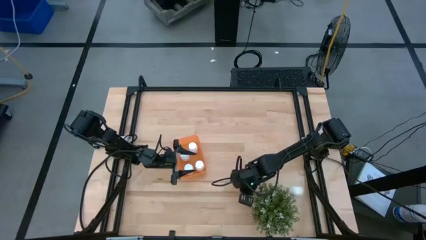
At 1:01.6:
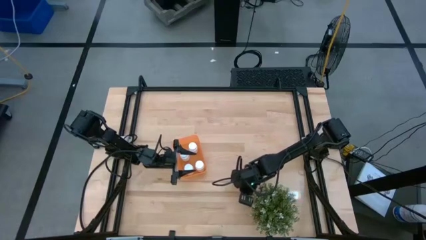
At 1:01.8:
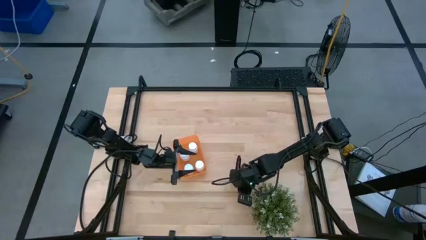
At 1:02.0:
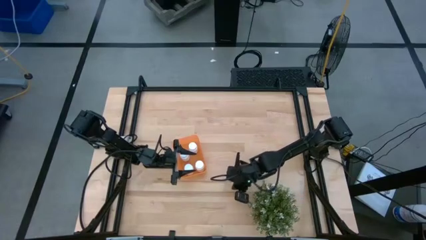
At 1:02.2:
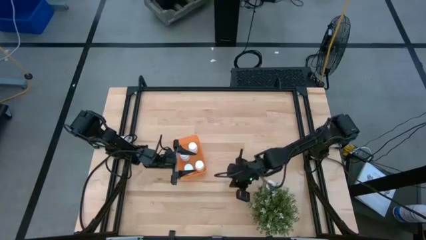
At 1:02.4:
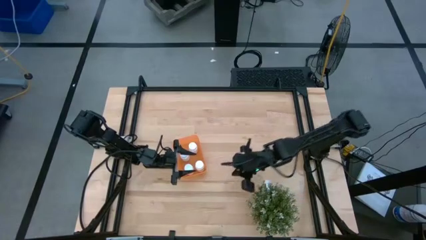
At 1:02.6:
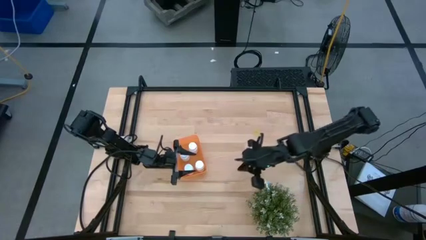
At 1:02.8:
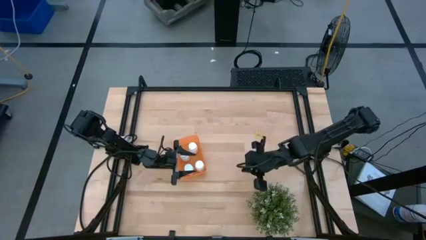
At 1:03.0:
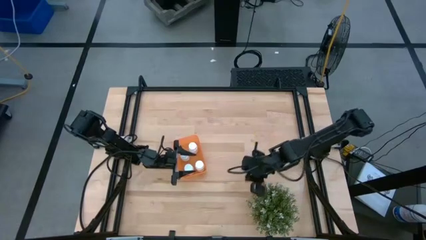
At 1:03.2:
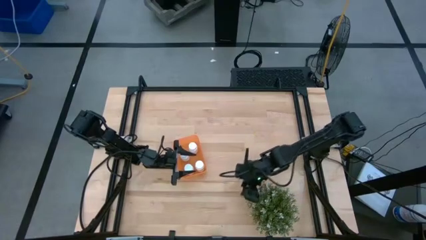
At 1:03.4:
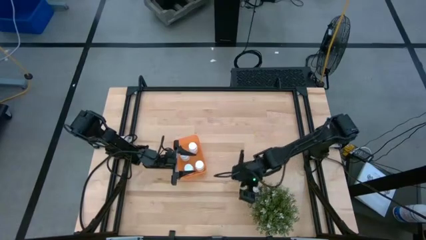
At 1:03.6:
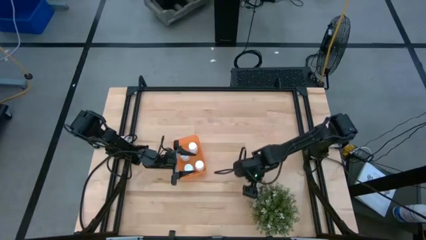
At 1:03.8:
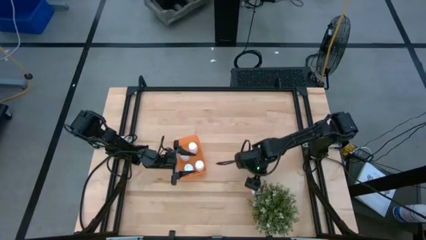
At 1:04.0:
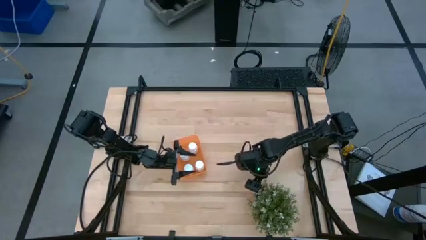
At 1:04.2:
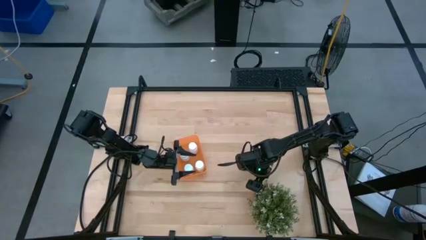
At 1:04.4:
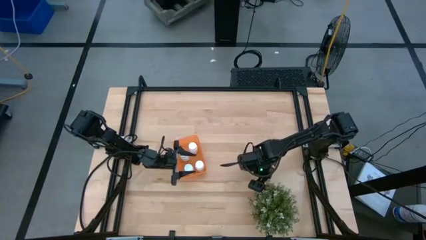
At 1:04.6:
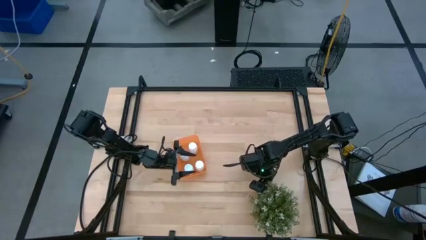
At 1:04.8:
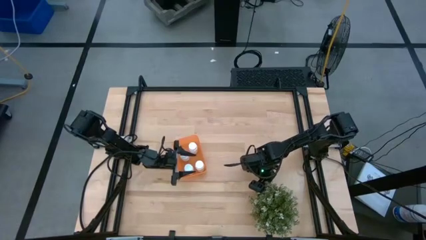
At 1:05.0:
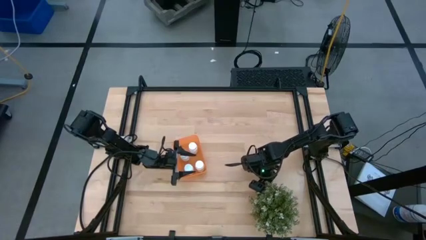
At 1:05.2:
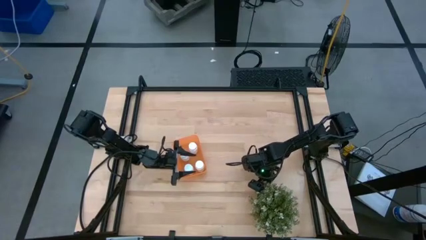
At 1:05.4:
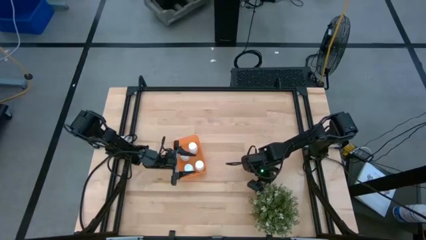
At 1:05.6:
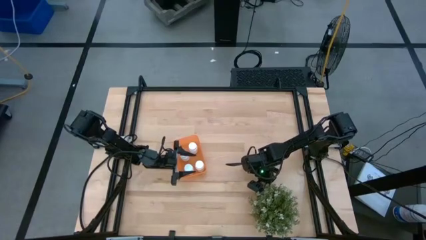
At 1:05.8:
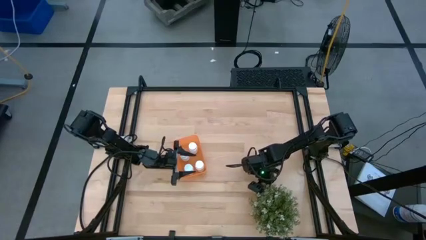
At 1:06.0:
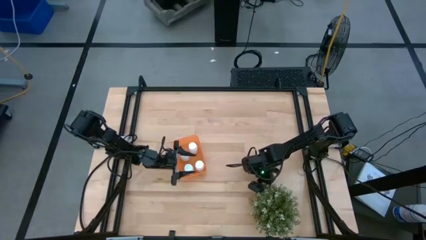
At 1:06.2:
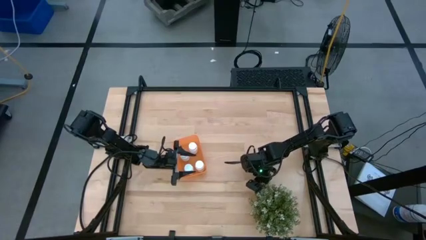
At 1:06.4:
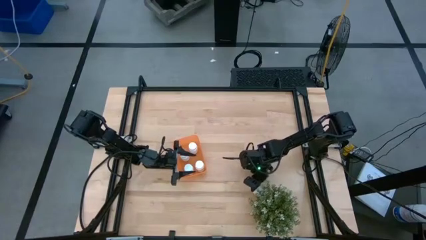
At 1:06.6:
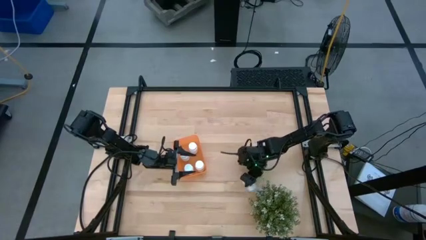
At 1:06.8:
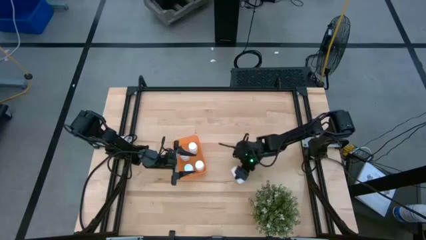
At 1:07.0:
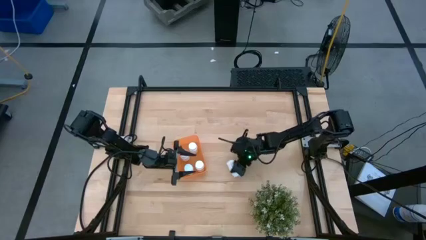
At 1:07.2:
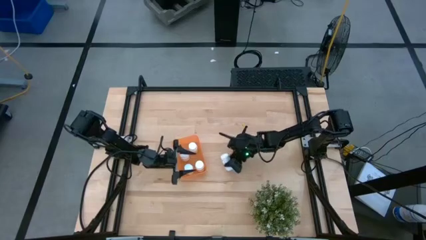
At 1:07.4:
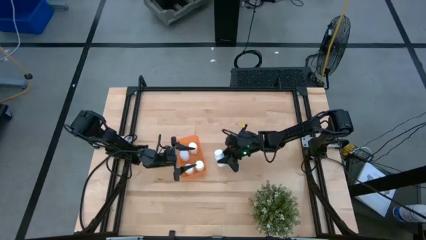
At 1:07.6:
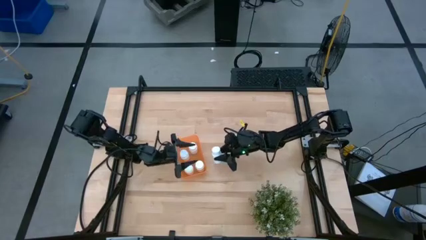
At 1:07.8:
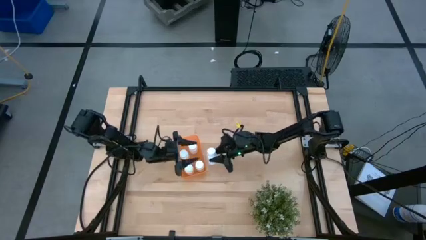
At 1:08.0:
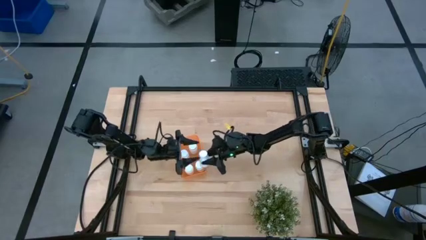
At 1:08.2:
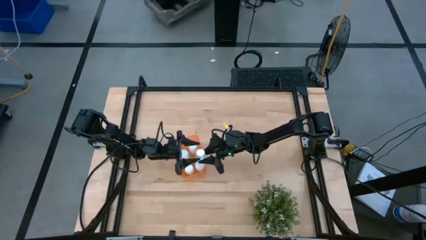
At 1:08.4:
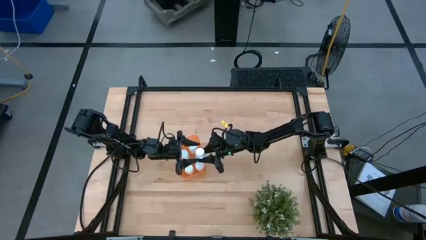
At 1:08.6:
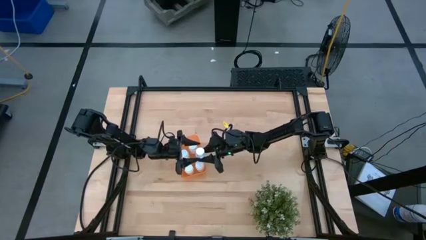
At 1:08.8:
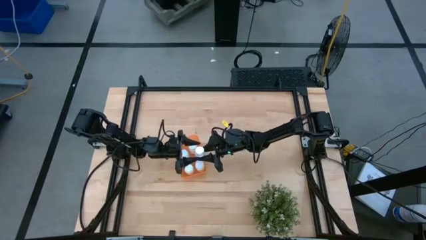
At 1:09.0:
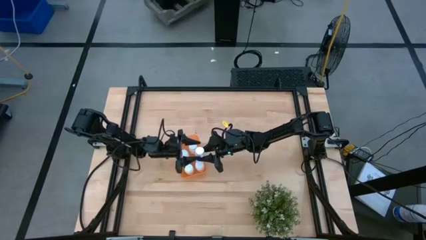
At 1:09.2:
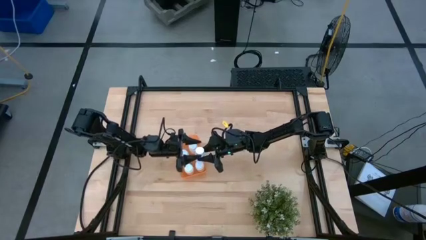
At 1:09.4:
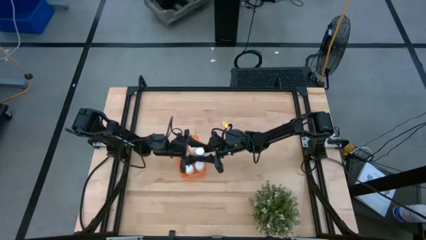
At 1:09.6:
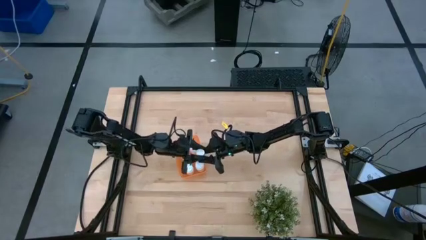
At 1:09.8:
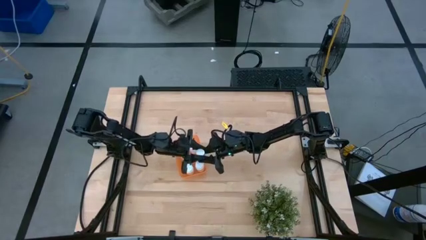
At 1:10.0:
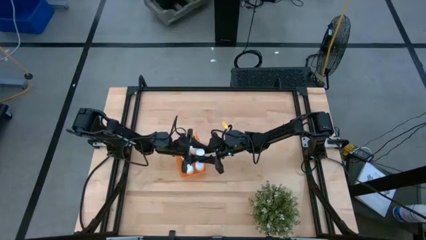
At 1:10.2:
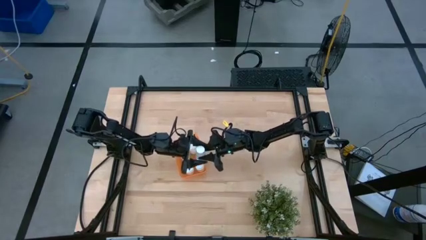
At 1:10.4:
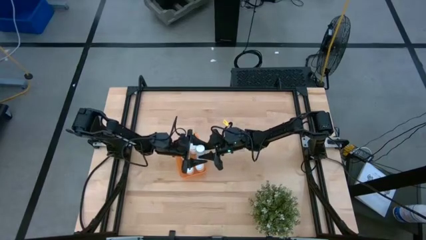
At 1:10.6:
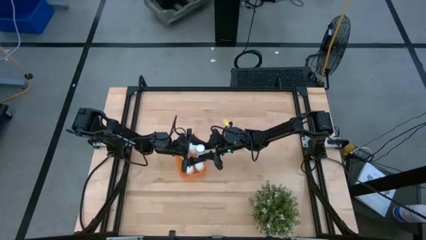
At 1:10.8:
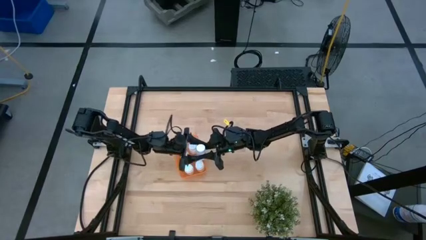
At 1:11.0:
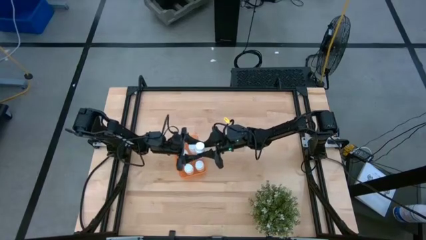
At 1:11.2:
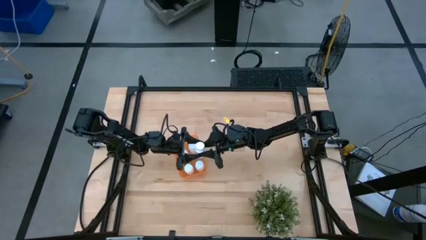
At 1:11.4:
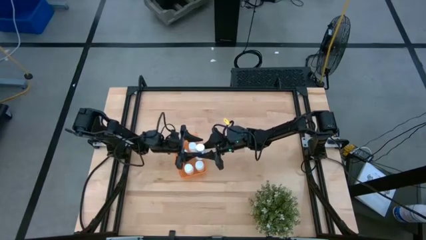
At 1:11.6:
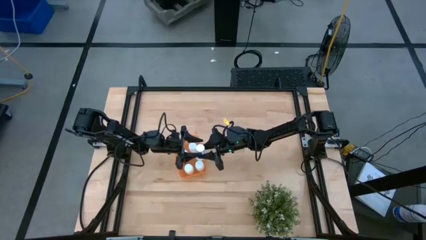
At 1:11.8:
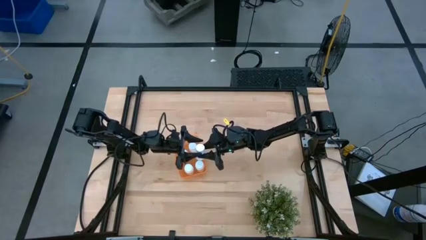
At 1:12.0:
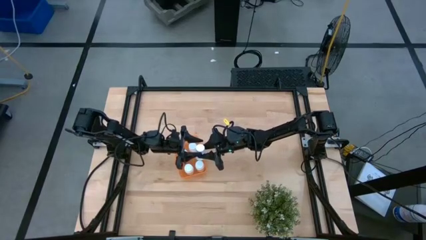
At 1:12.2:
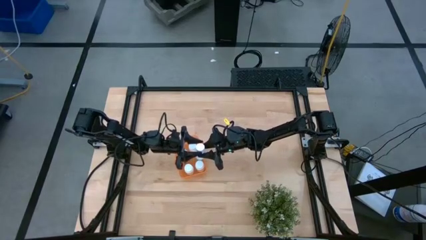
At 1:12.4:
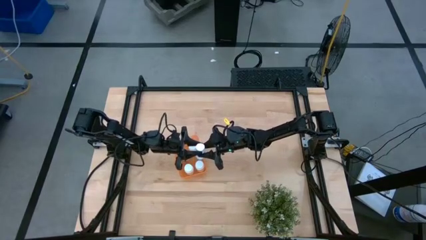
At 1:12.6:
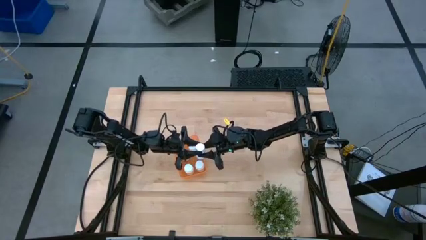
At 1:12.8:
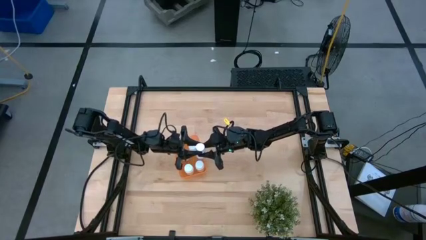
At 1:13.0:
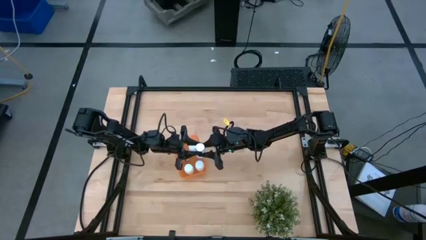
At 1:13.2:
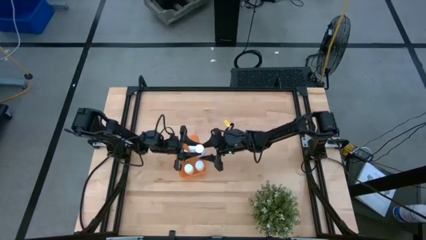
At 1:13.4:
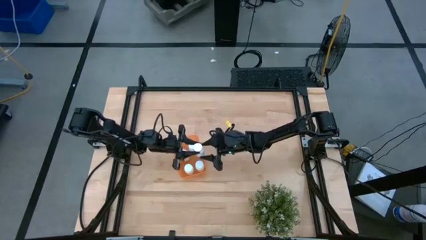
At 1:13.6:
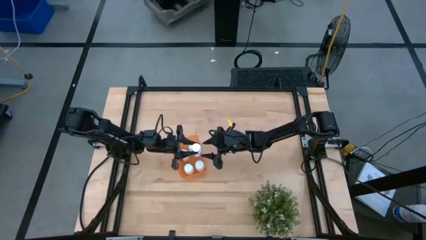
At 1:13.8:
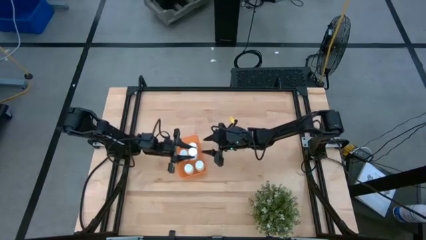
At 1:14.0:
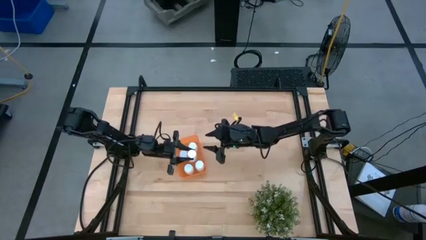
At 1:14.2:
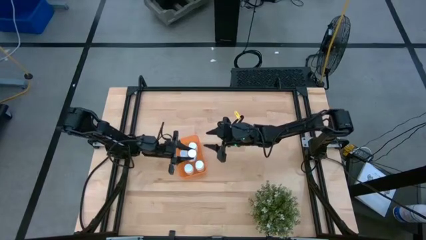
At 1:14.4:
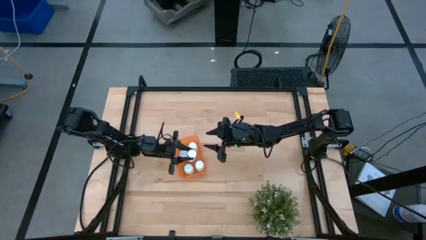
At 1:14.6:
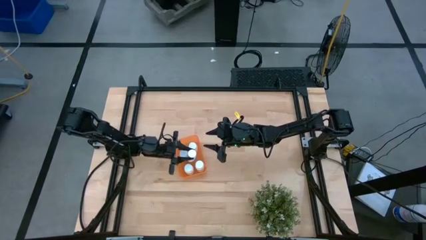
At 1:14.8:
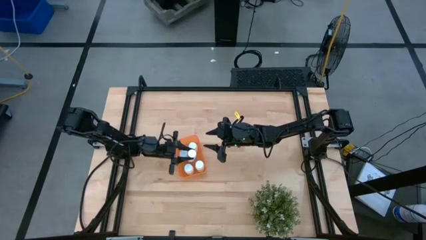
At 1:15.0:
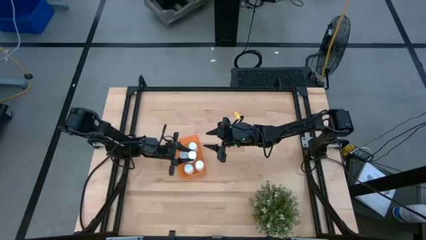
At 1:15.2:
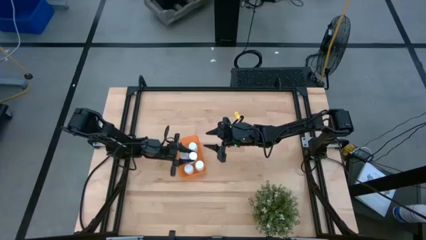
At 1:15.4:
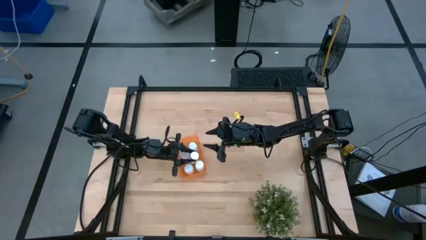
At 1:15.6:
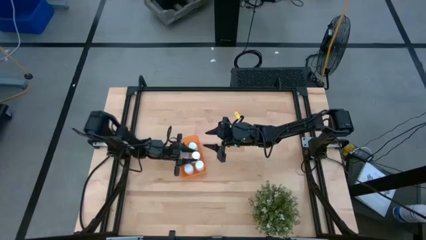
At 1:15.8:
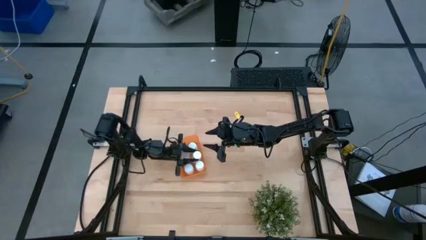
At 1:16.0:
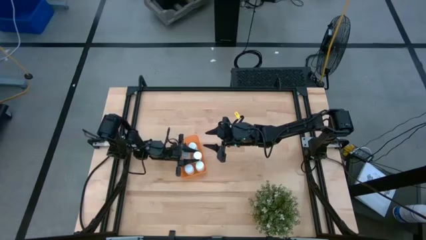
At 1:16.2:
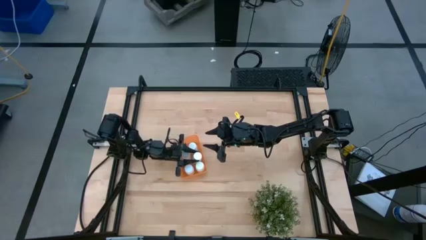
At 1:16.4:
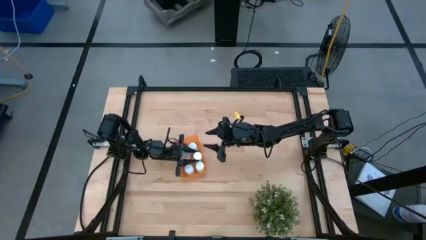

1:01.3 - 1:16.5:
Task: Pick and place pill bottles into a basket
Put the white medicine bottle into the orange bin
